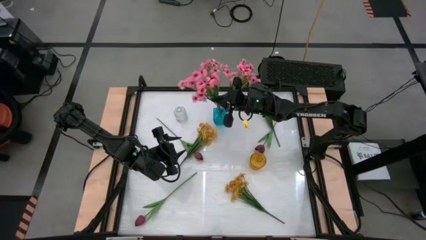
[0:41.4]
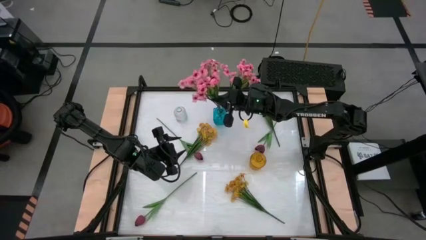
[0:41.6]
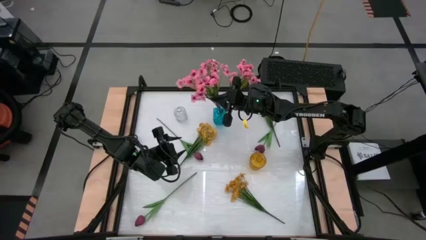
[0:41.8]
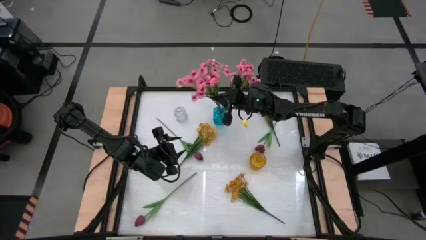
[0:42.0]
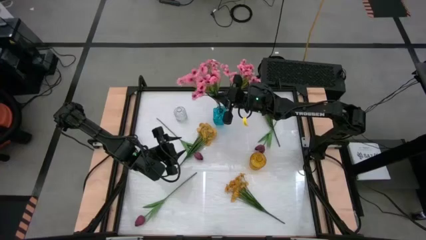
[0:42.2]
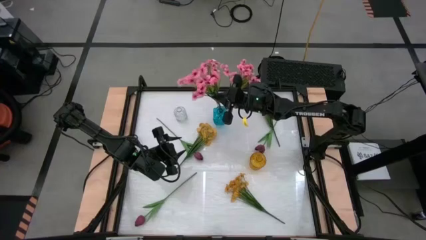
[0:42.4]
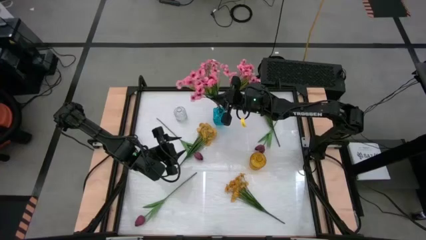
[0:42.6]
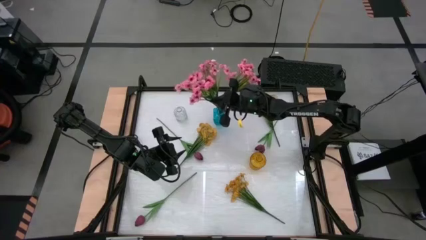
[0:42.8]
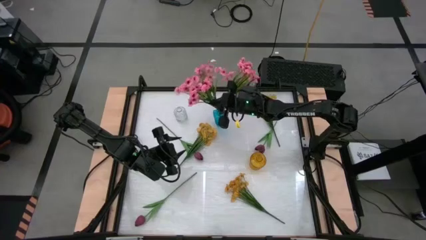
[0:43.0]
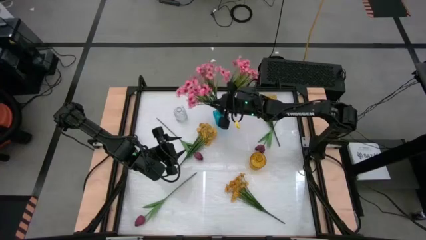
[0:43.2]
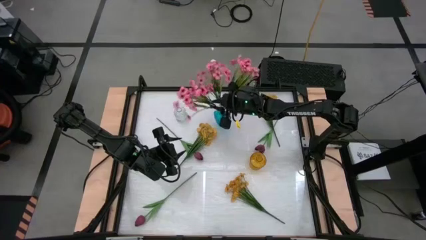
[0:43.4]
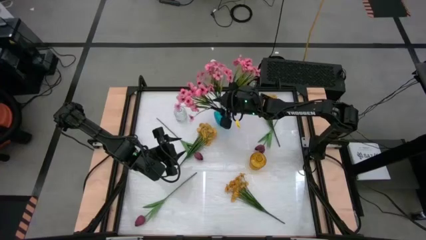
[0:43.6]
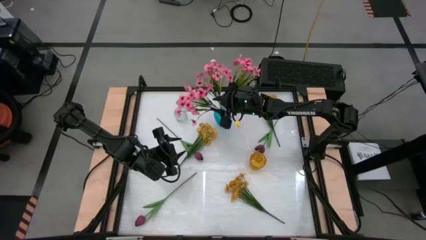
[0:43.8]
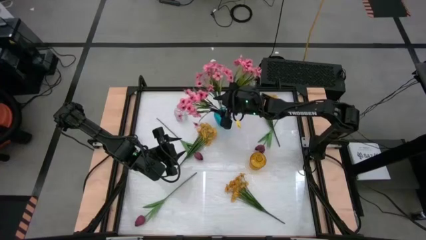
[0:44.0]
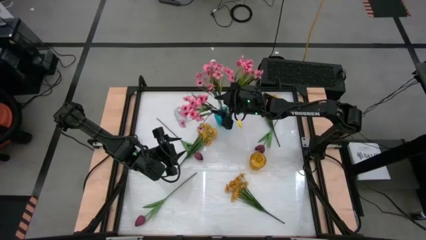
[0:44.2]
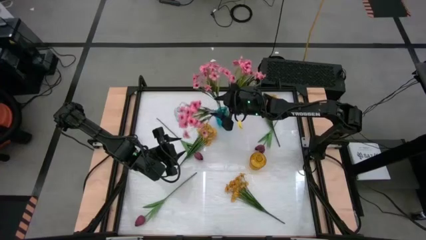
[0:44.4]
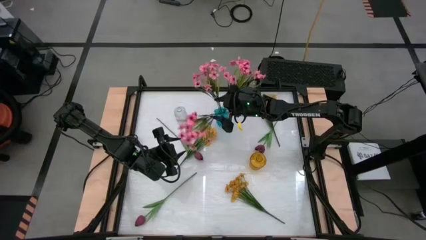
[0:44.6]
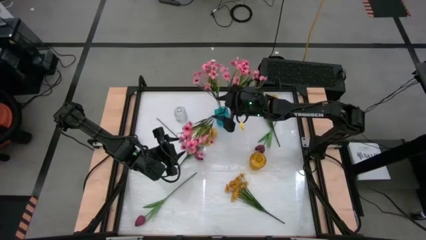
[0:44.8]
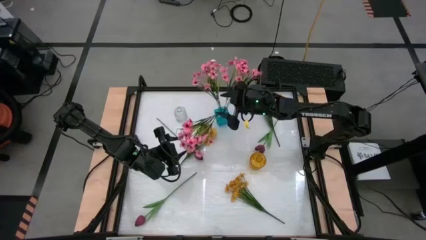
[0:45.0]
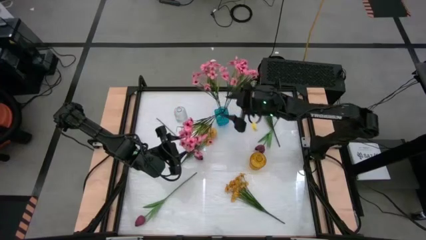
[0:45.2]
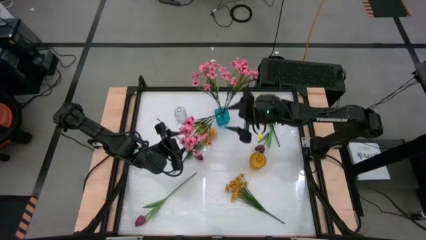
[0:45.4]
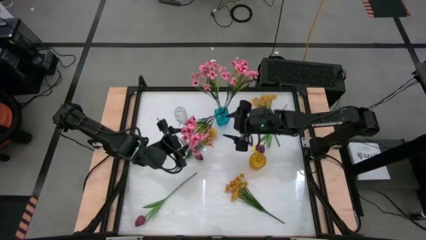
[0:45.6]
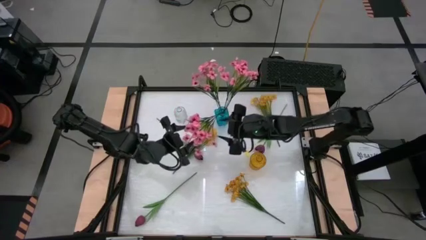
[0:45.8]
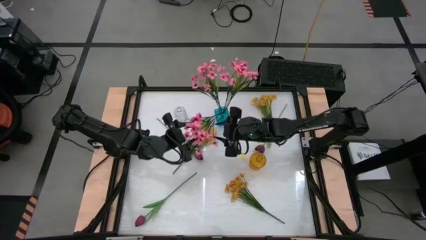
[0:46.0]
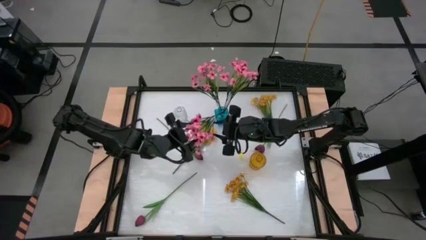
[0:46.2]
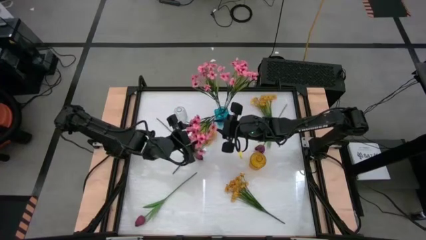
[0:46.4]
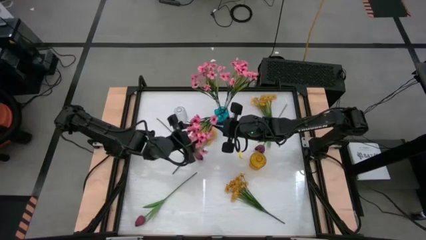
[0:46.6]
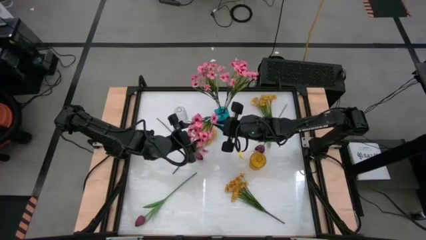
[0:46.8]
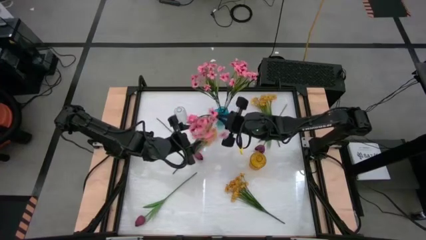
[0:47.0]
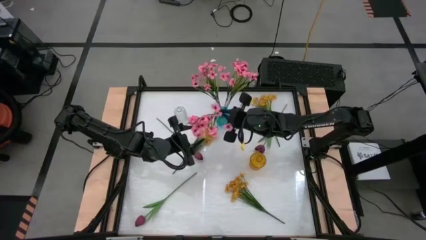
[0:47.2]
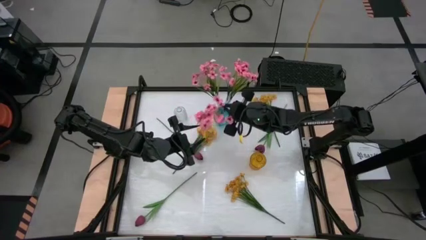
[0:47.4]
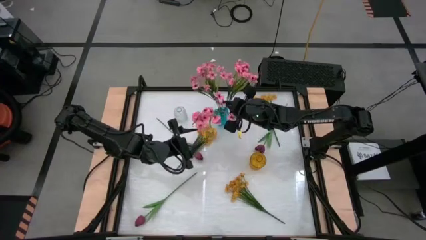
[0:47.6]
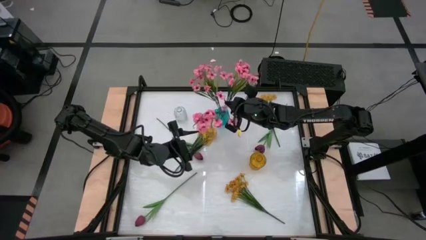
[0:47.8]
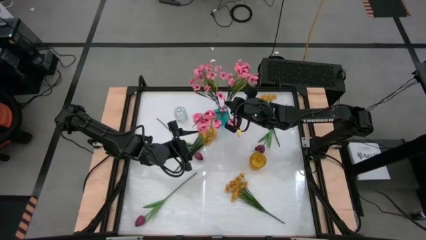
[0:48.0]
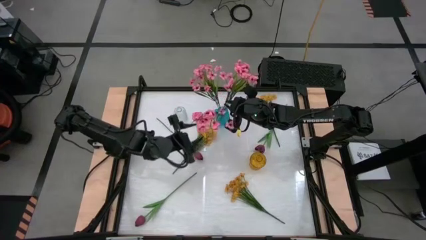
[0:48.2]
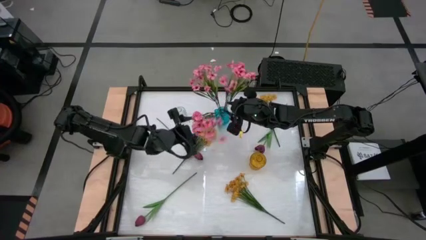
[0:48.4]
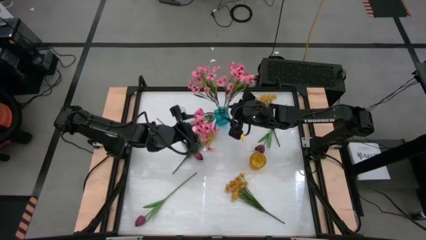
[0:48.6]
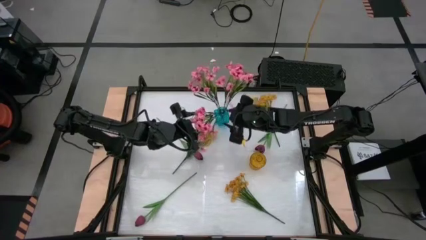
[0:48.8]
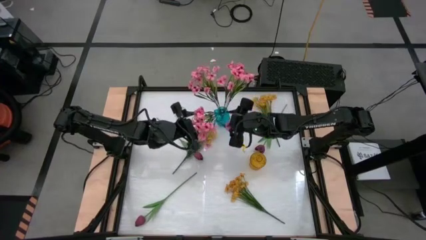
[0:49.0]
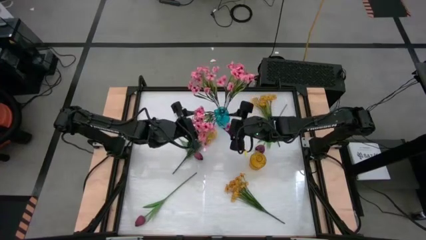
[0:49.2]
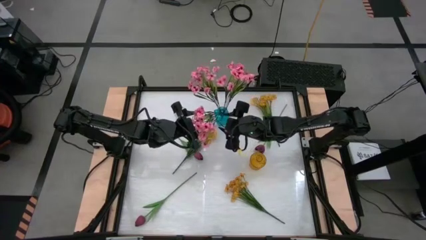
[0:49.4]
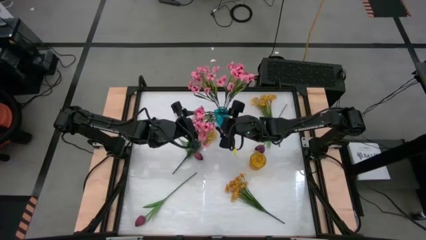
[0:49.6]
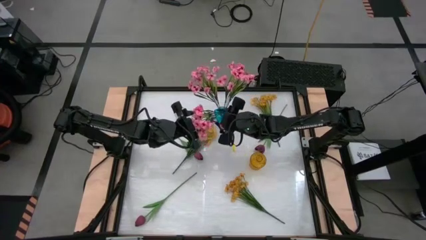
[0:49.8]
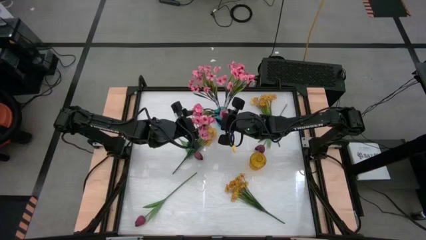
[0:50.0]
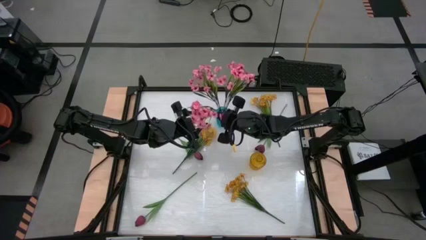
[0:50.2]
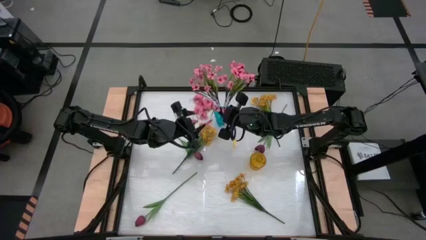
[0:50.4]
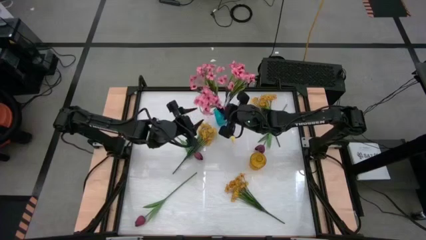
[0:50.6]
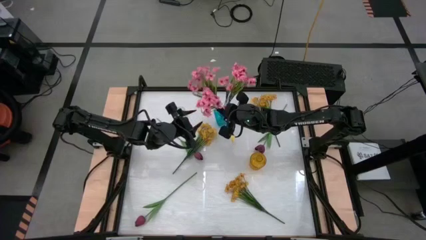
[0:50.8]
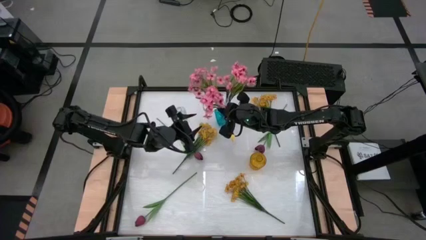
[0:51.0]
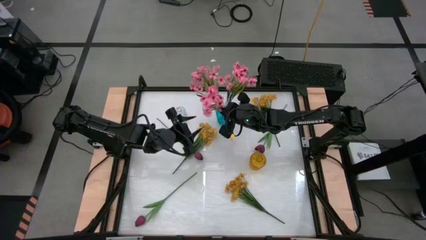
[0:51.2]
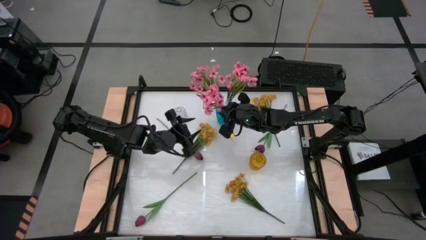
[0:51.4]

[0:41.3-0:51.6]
Task: Sort flowers into vase by color
Put the pink flowers into the blue vase
